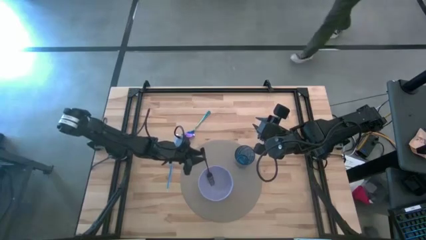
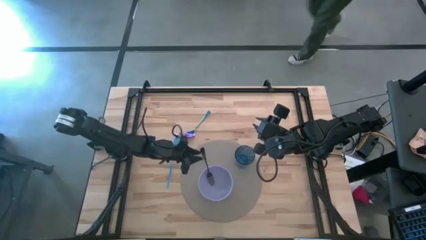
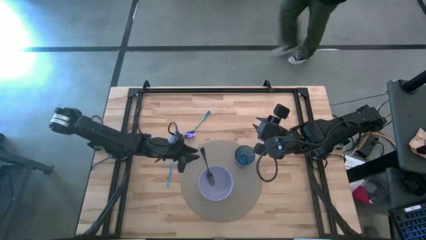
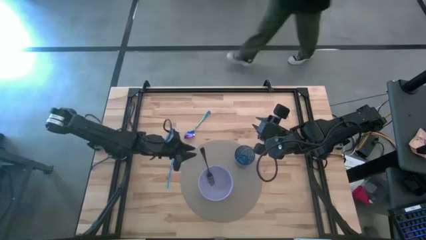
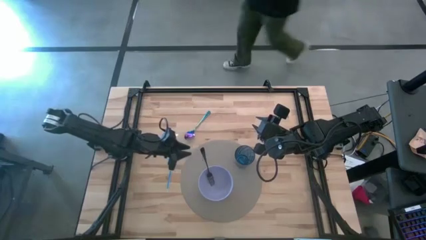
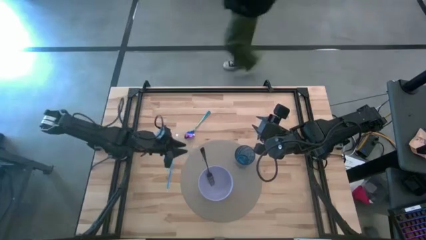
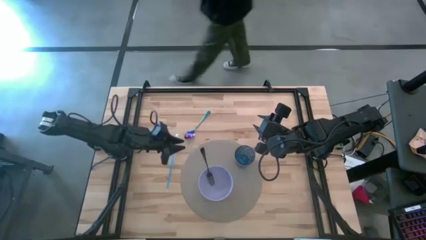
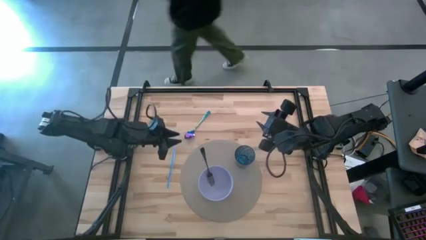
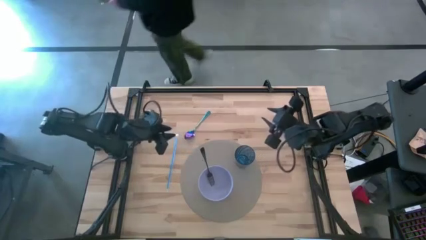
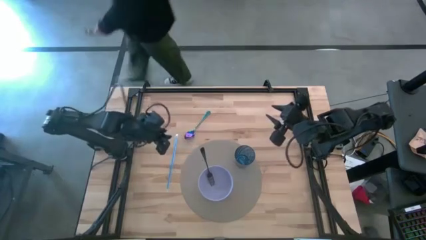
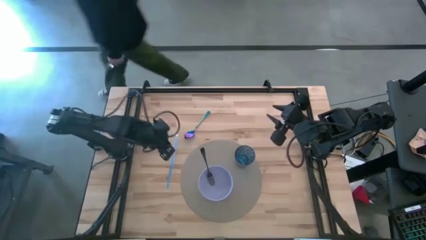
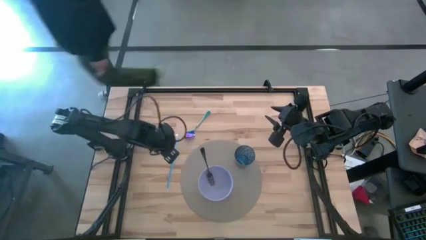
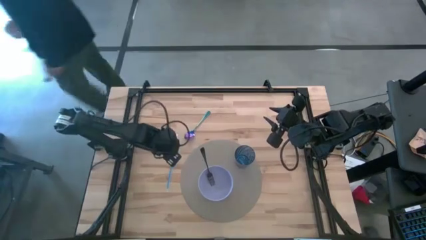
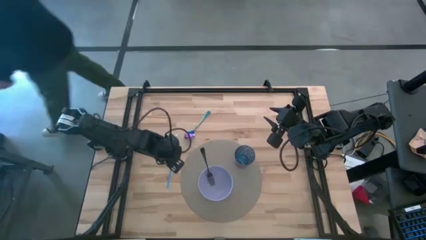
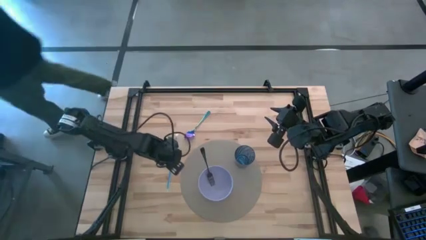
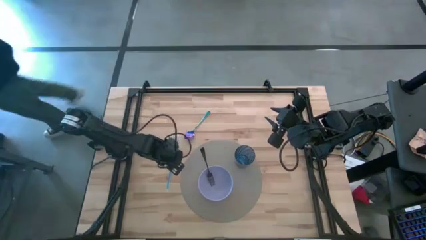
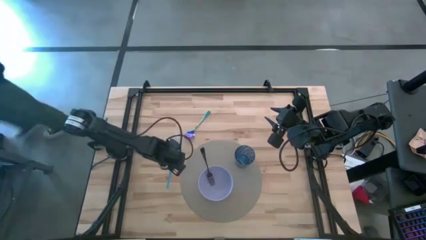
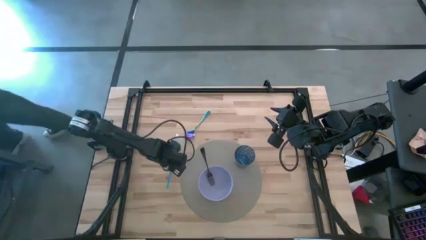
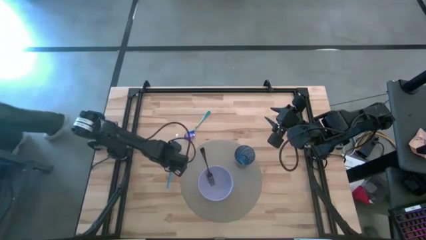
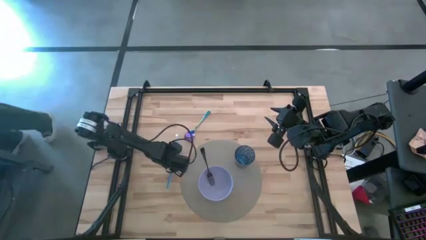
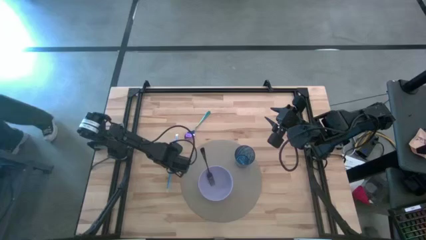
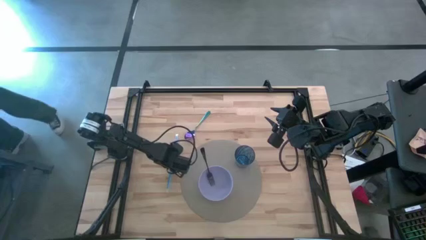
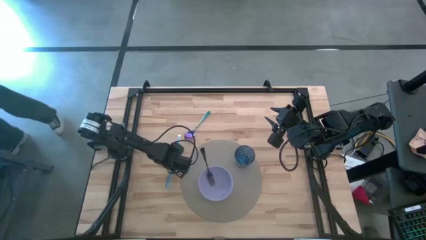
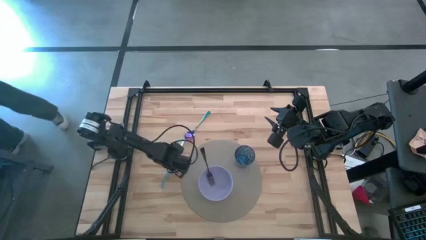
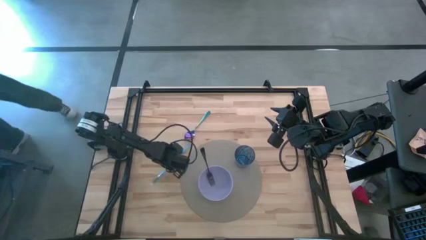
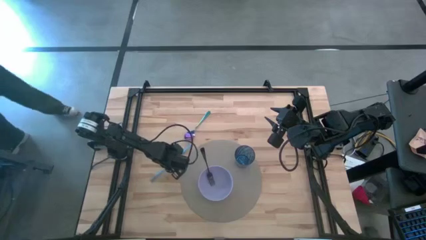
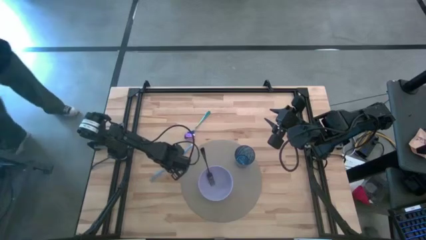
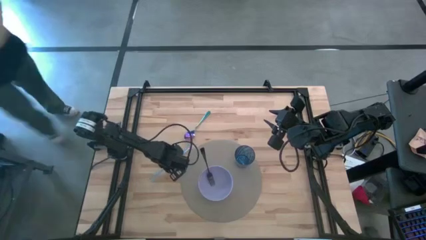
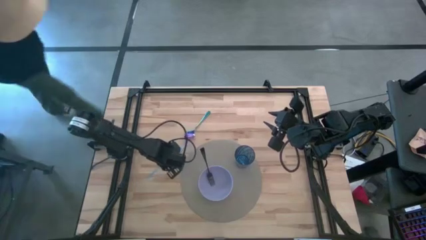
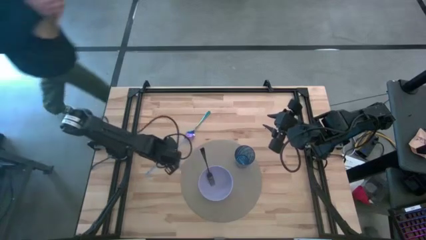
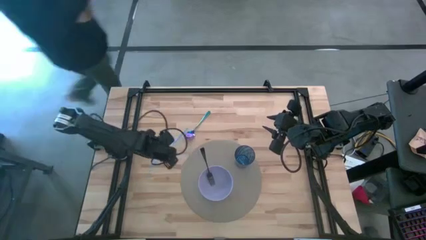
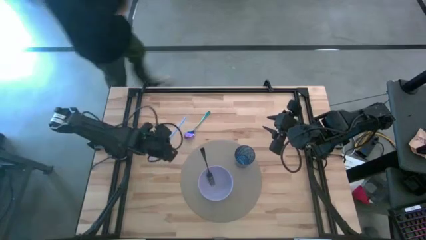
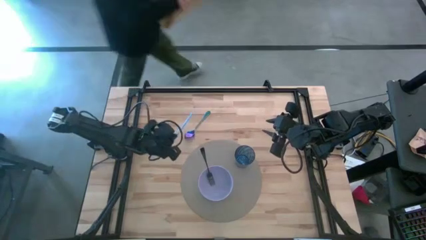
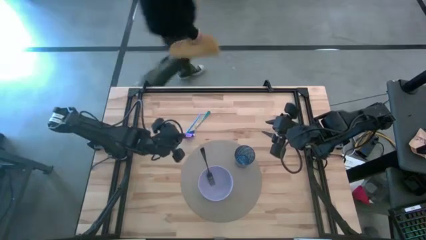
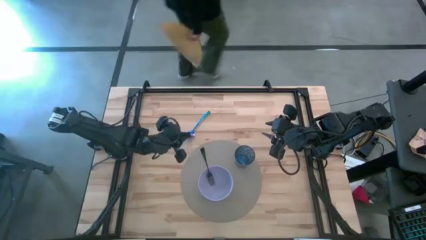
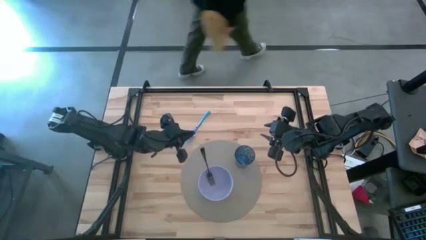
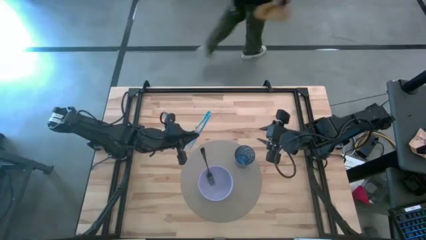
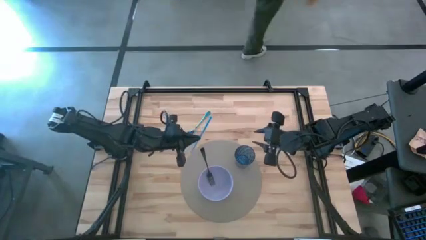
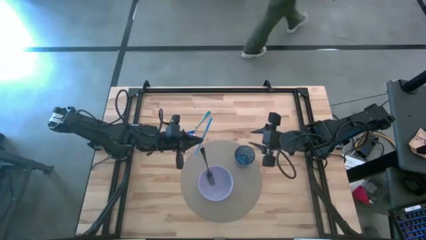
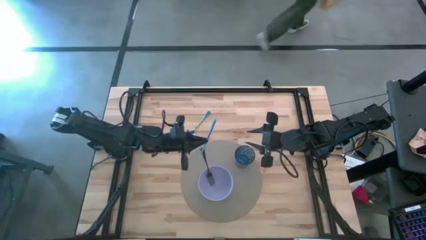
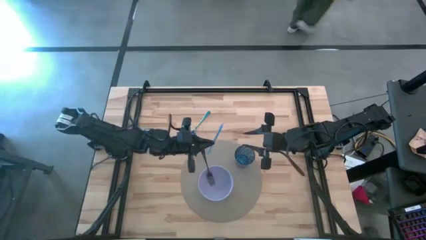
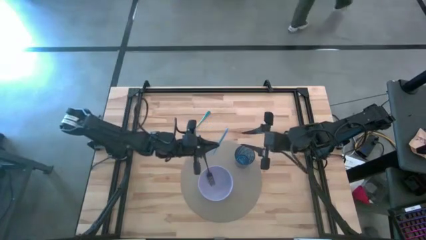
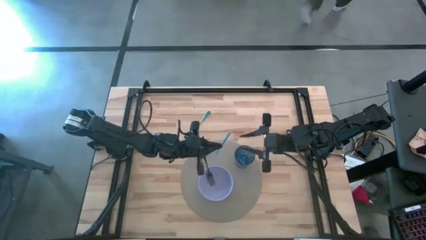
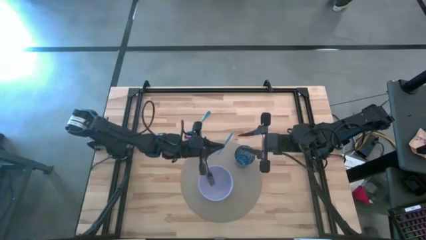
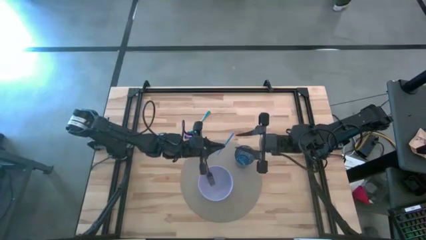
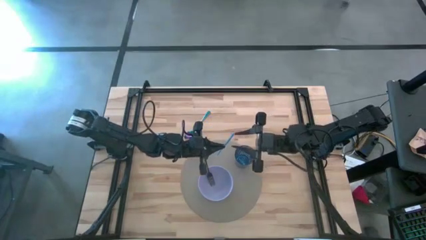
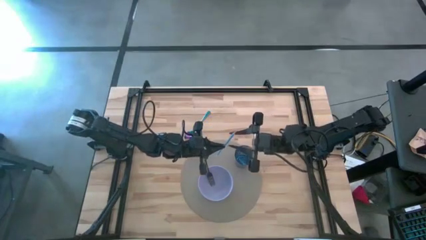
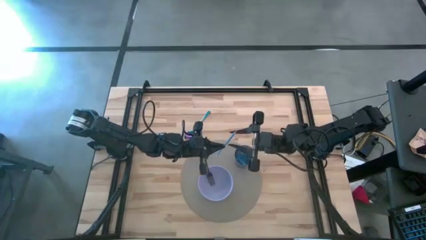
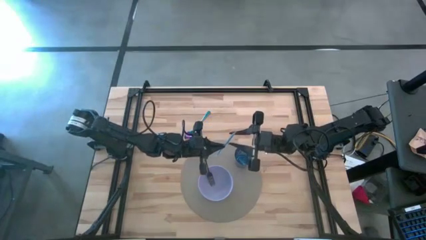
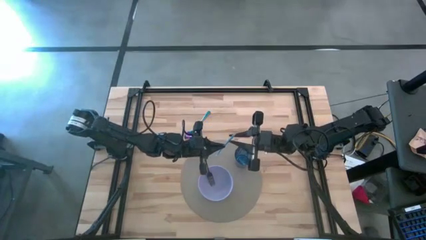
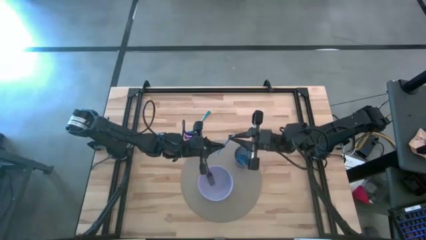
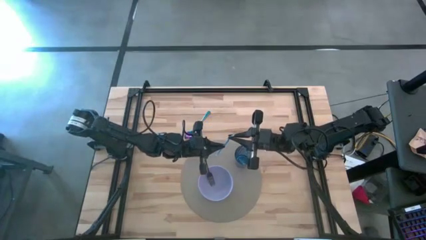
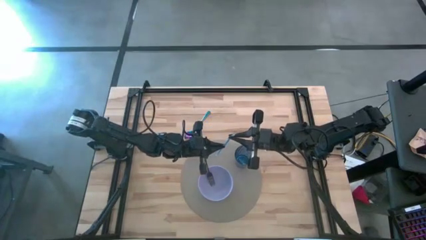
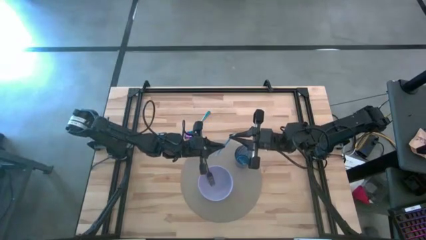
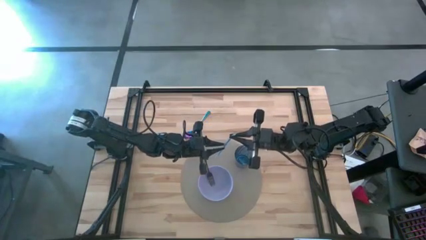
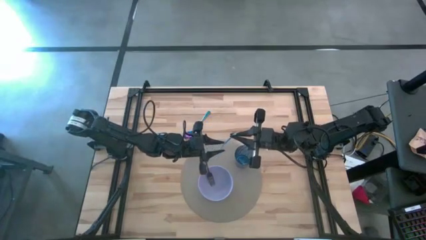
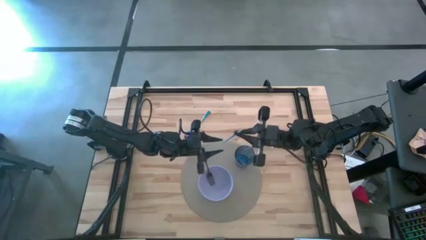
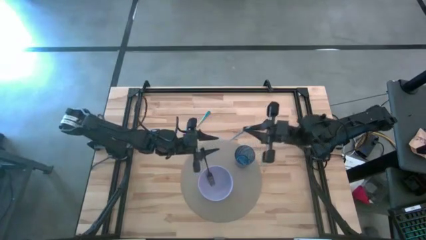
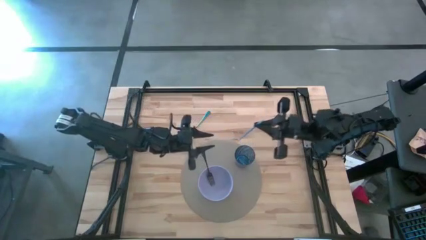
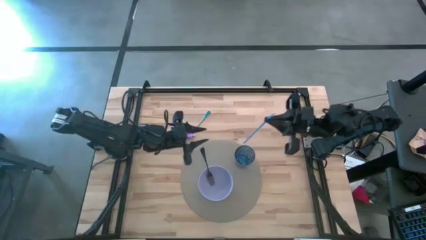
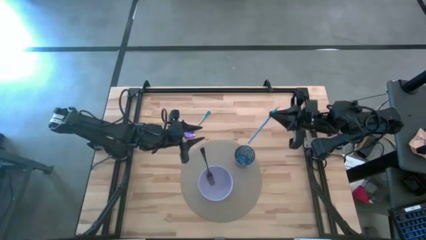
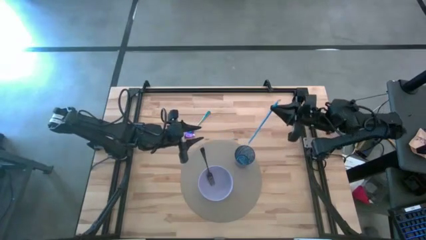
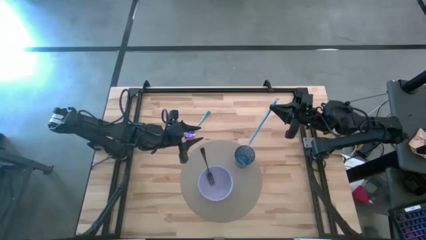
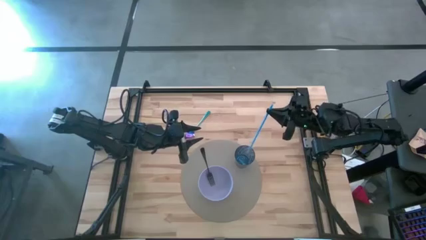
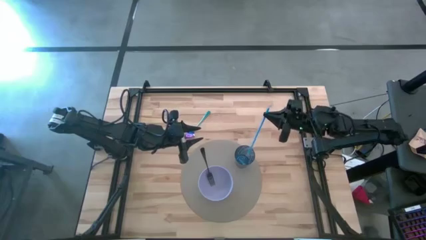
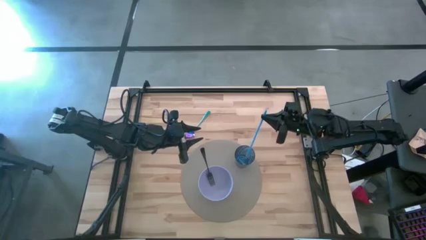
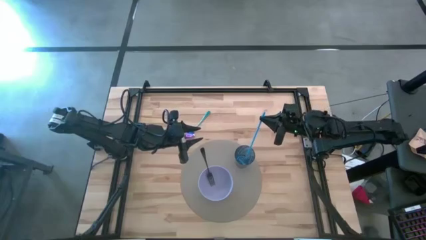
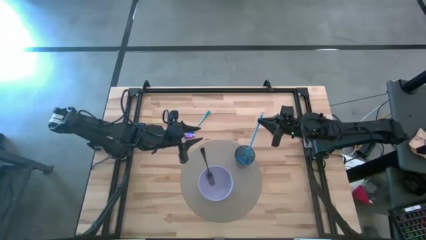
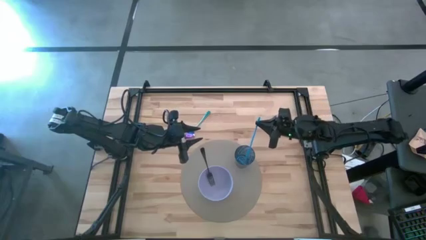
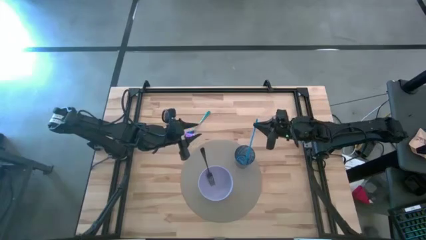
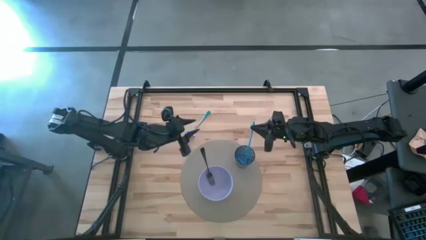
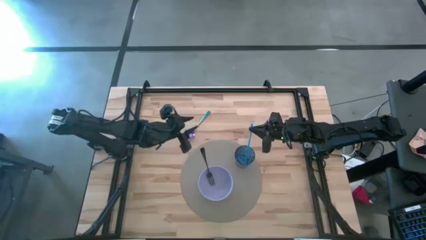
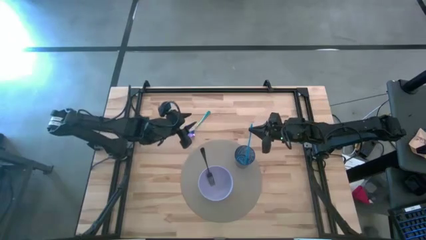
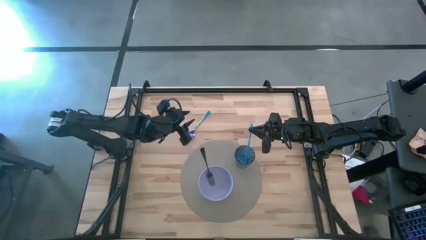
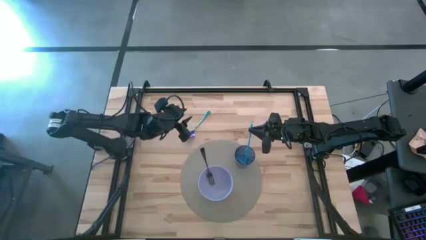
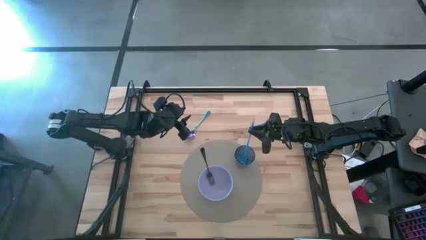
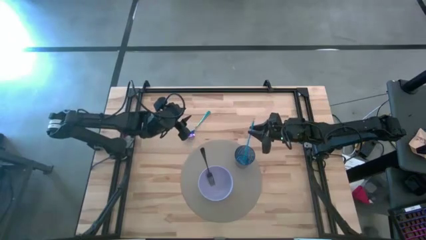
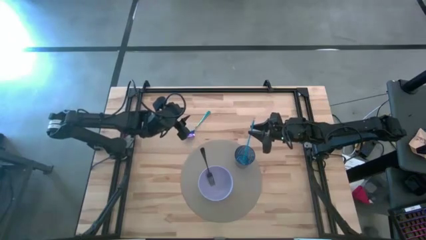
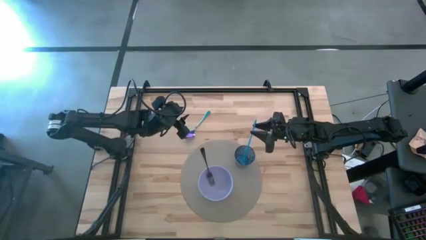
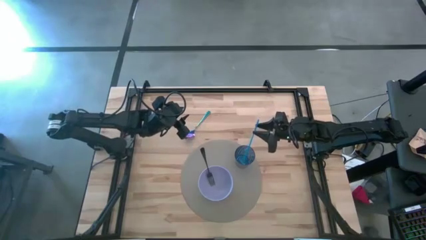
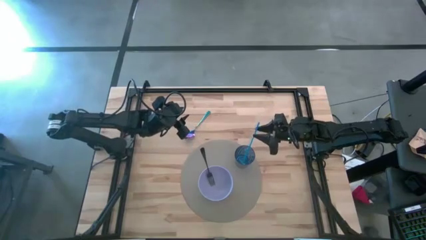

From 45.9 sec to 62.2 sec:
Task: Pick & Place Utensil
Put the straw into the cup
